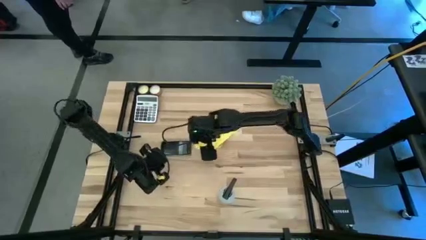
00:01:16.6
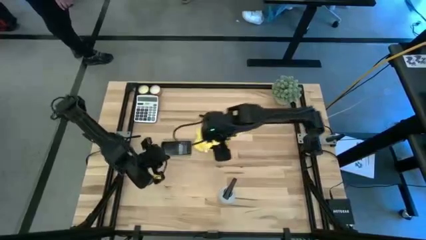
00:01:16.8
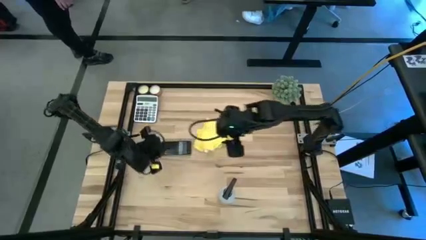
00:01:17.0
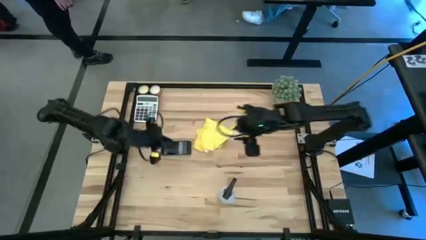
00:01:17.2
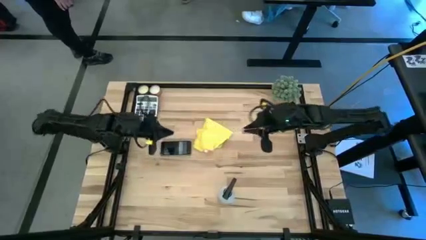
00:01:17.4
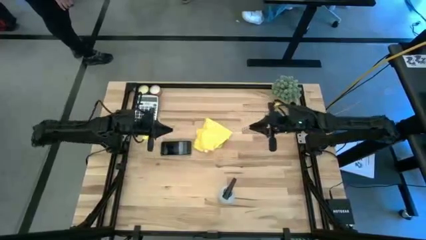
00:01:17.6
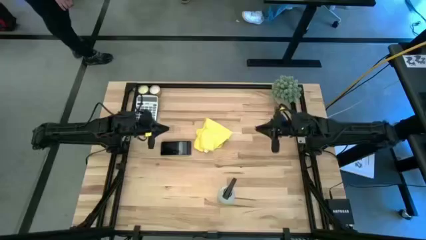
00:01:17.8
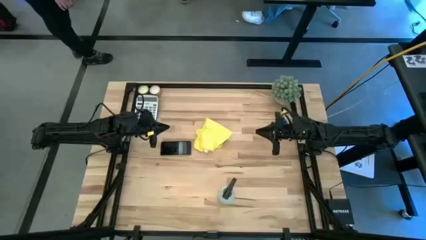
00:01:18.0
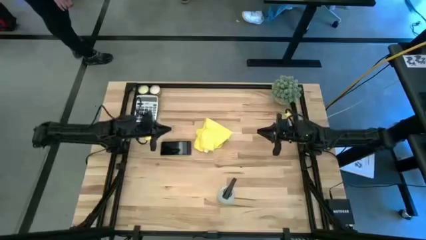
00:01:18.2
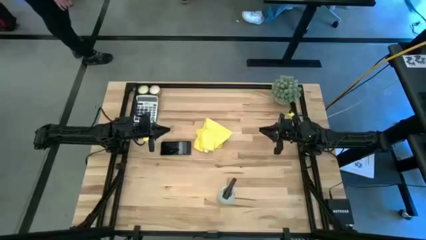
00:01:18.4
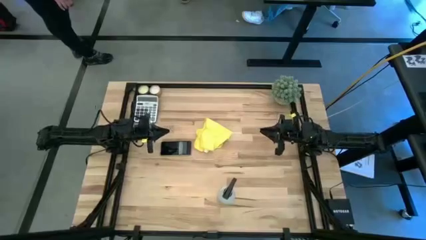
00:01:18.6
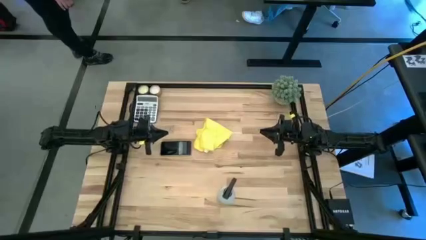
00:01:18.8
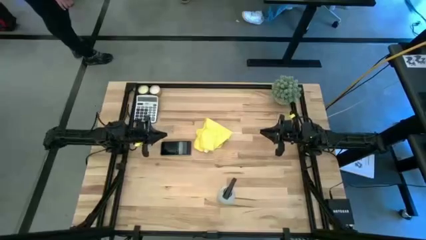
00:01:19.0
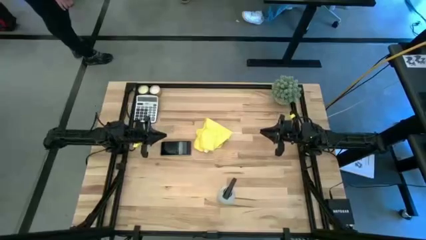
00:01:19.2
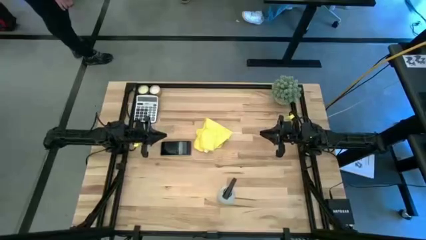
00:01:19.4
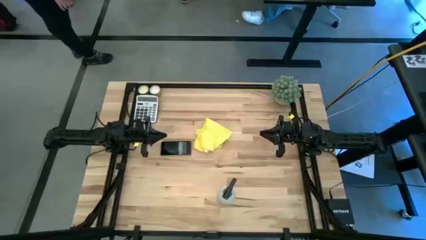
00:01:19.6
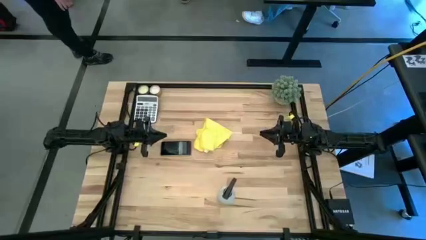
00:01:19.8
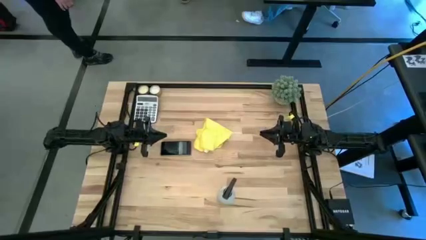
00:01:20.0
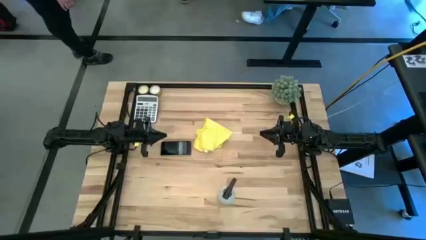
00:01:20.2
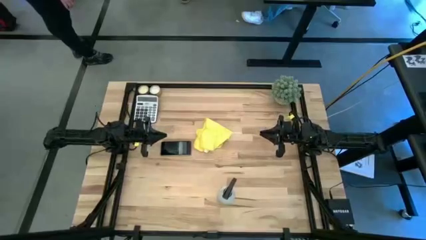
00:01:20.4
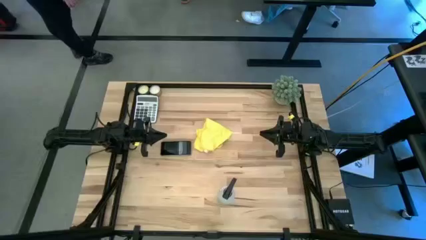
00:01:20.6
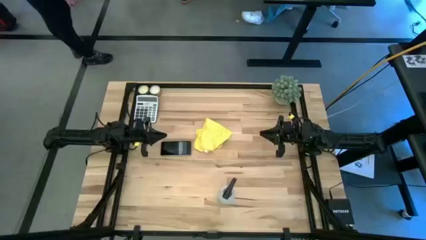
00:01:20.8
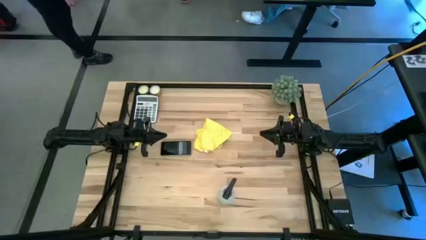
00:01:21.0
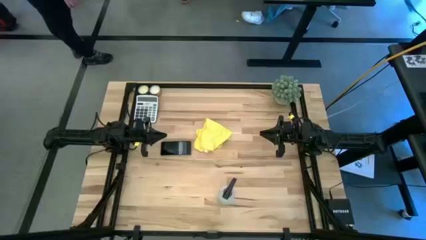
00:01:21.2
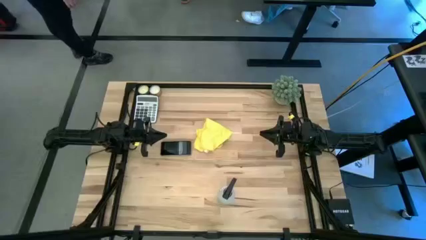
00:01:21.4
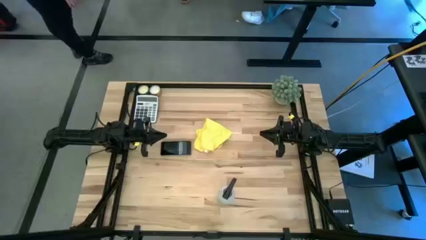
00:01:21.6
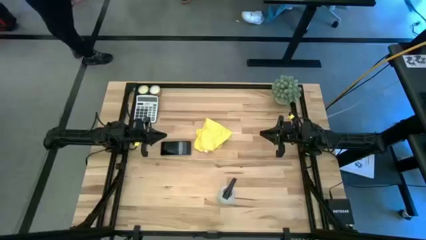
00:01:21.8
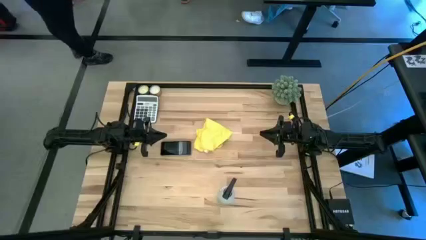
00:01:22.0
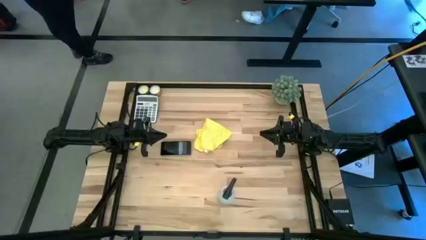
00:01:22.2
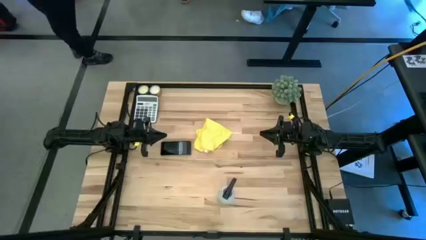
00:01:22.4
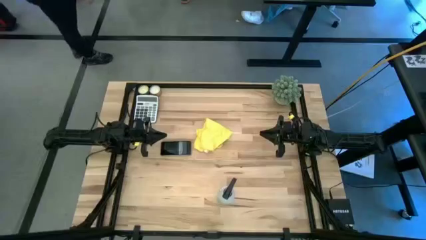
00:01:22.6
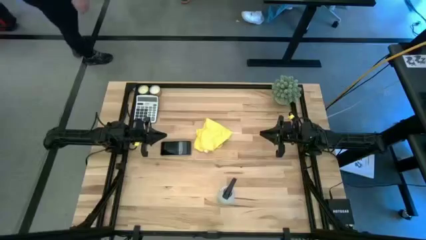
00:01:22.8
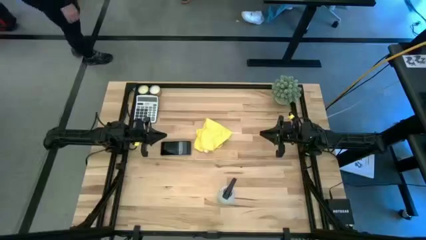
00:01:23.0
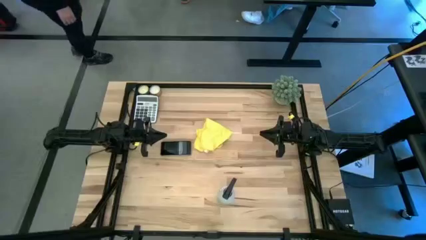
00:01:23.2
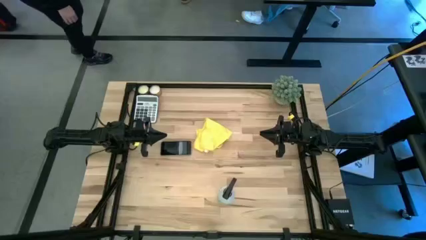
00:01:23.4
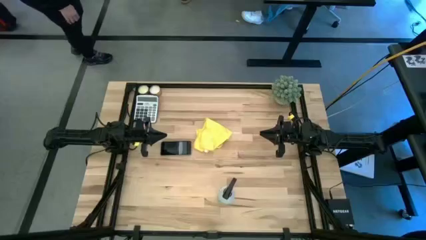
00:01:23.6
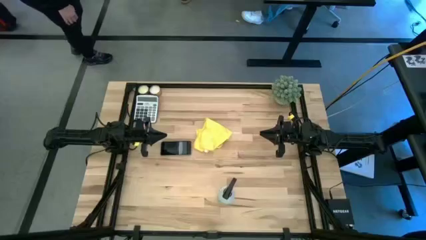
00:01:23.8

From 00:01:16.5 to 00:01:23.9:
Task: Apply microfiber cloth
Return to Home Position

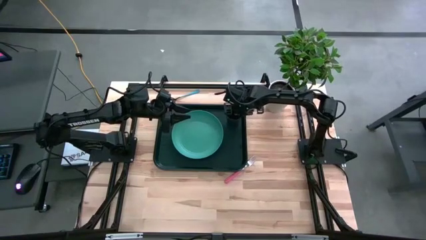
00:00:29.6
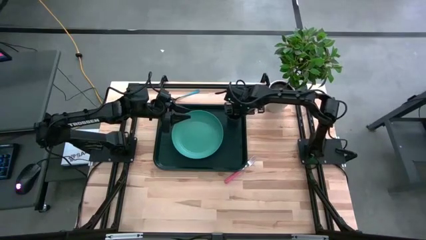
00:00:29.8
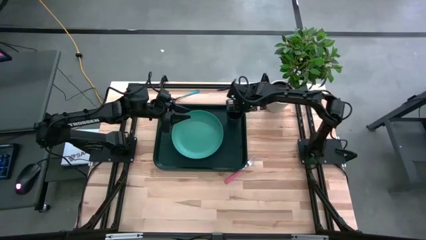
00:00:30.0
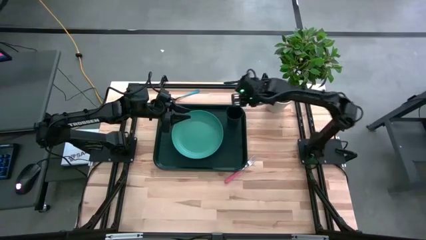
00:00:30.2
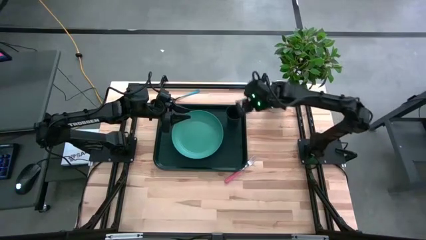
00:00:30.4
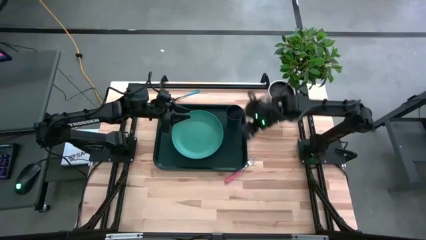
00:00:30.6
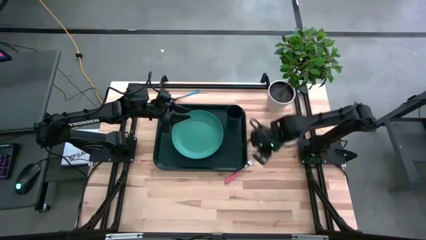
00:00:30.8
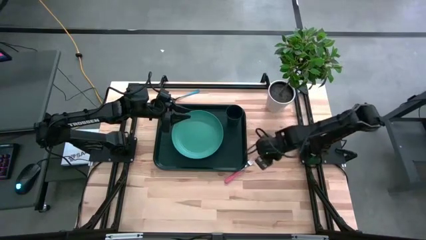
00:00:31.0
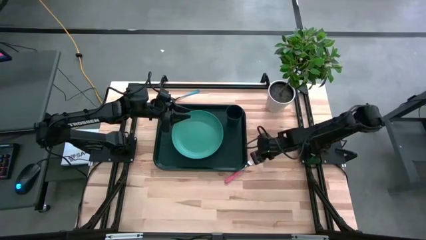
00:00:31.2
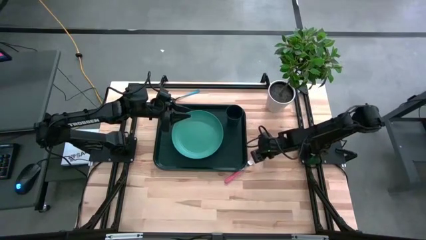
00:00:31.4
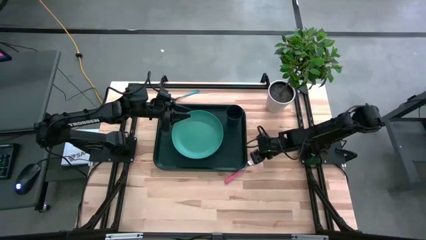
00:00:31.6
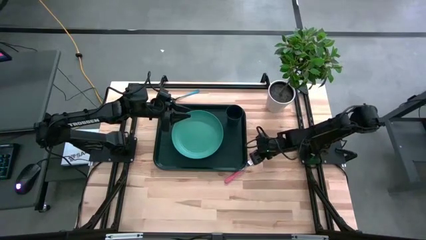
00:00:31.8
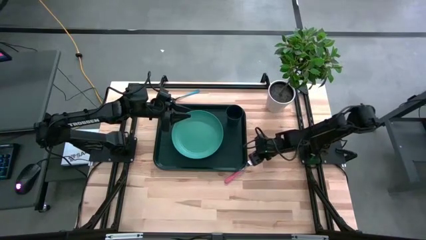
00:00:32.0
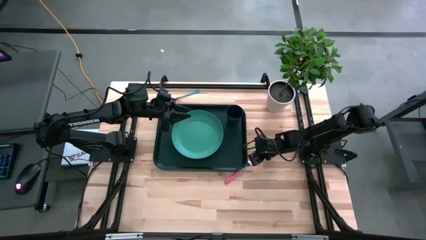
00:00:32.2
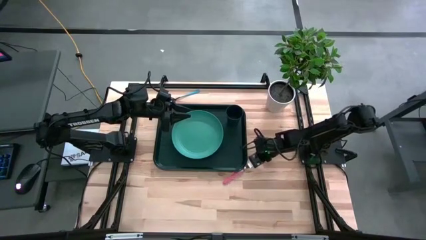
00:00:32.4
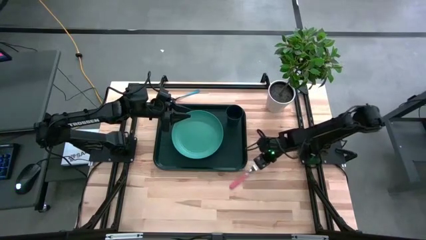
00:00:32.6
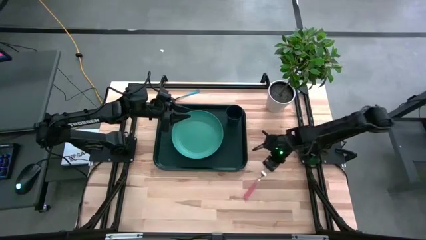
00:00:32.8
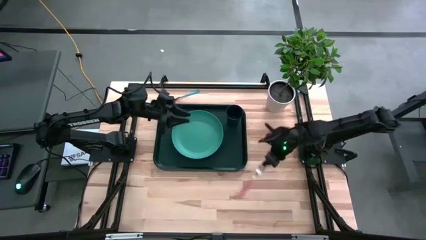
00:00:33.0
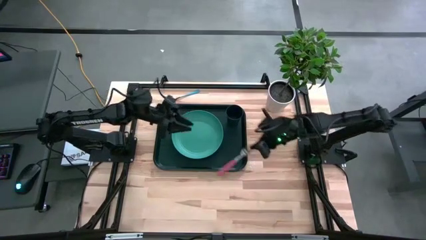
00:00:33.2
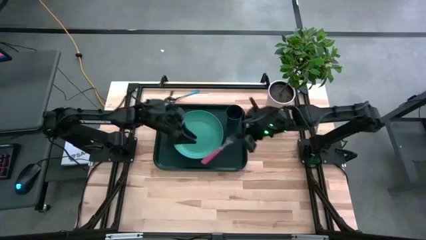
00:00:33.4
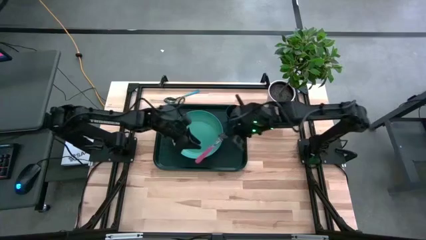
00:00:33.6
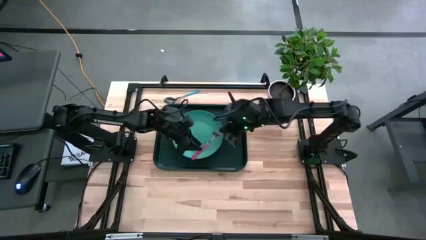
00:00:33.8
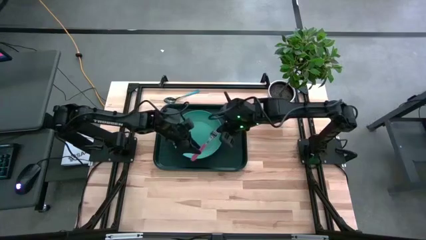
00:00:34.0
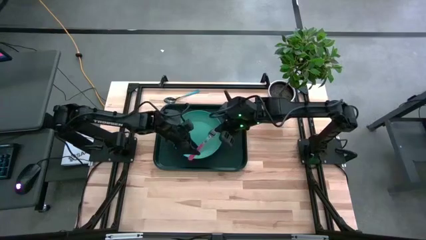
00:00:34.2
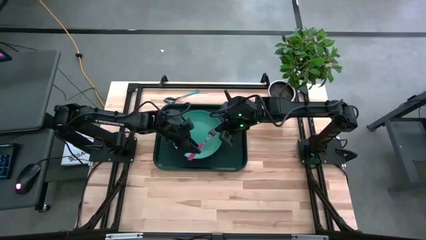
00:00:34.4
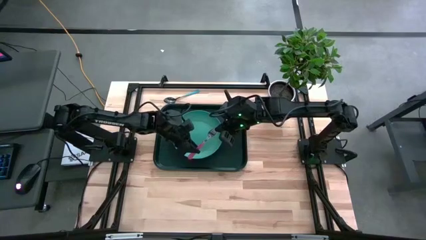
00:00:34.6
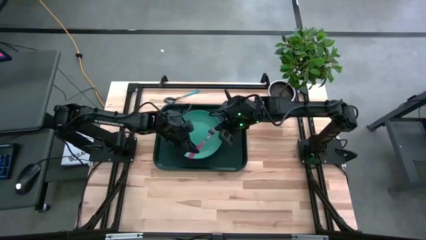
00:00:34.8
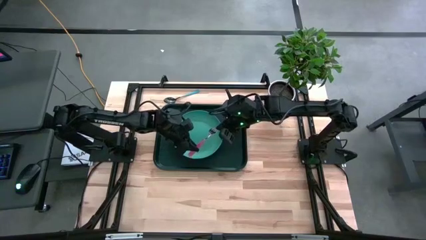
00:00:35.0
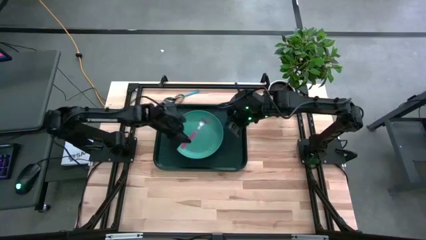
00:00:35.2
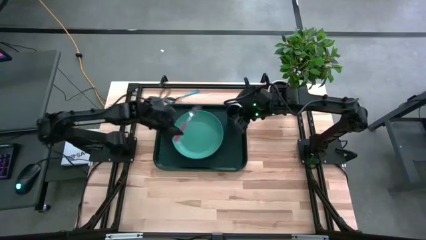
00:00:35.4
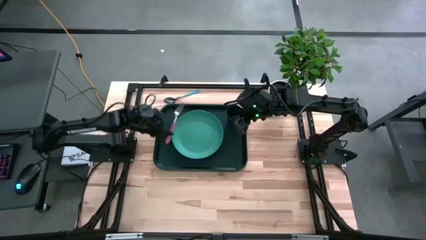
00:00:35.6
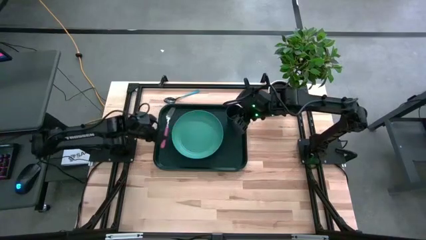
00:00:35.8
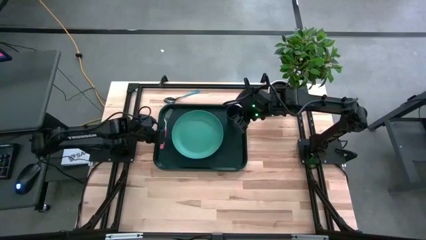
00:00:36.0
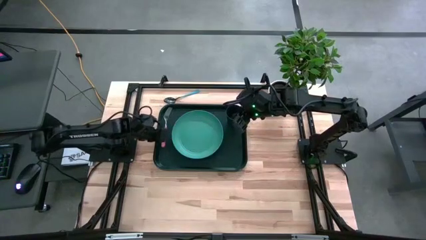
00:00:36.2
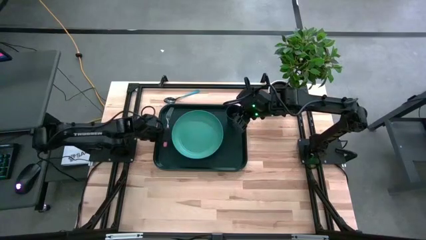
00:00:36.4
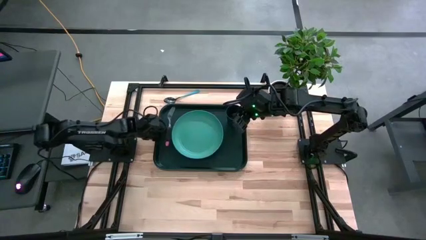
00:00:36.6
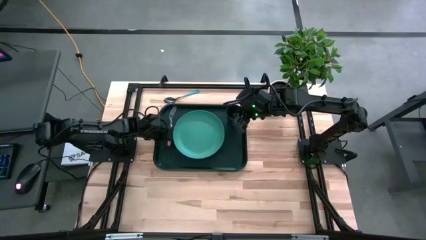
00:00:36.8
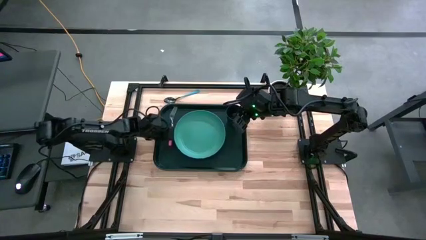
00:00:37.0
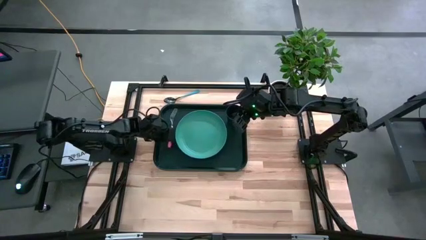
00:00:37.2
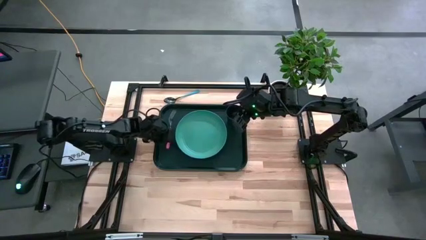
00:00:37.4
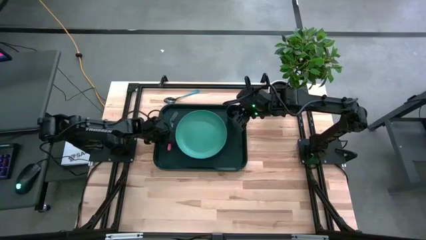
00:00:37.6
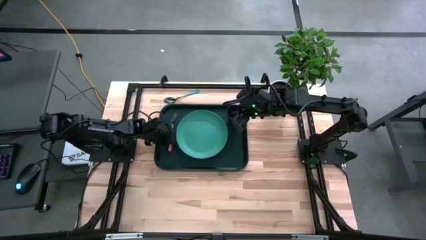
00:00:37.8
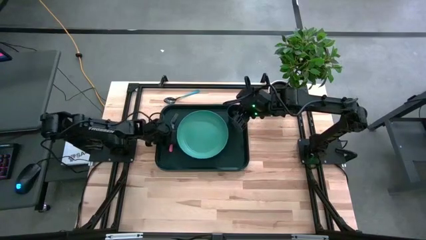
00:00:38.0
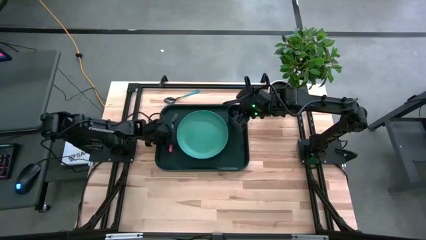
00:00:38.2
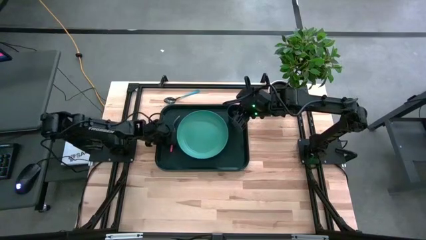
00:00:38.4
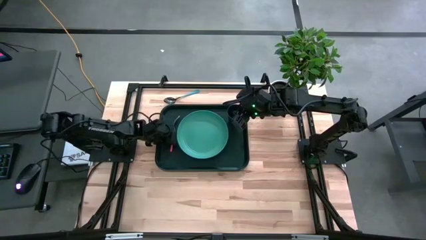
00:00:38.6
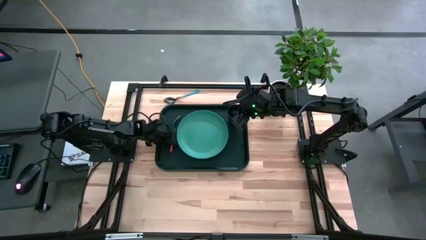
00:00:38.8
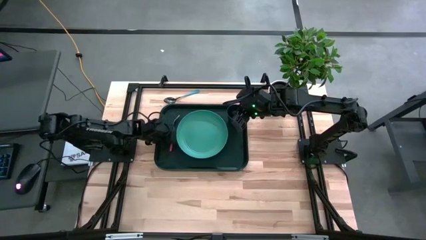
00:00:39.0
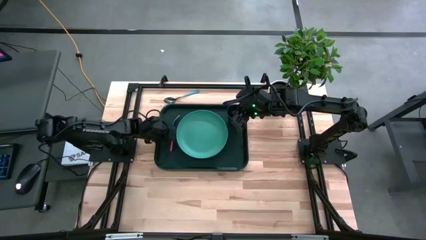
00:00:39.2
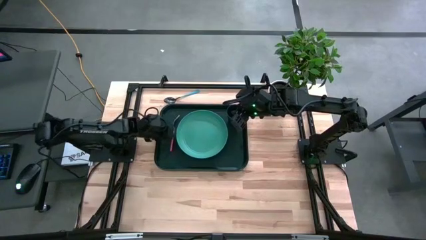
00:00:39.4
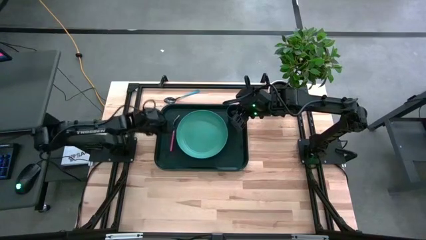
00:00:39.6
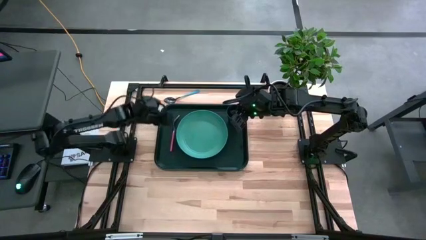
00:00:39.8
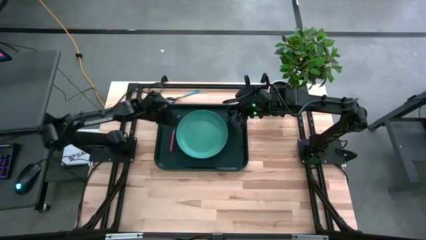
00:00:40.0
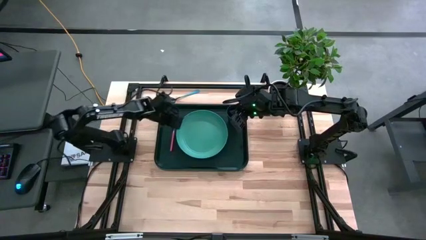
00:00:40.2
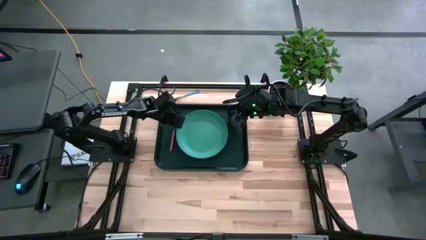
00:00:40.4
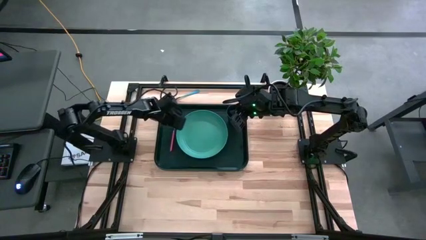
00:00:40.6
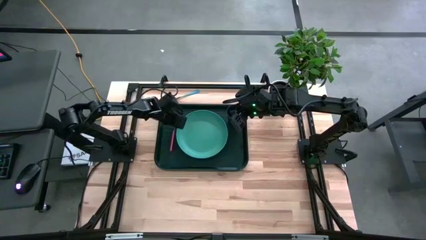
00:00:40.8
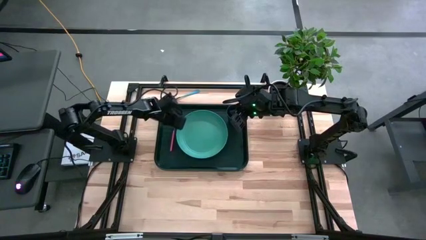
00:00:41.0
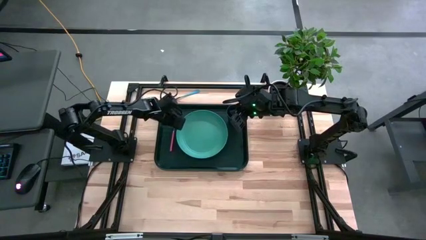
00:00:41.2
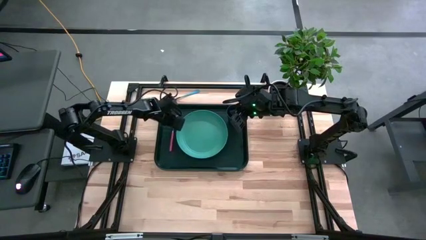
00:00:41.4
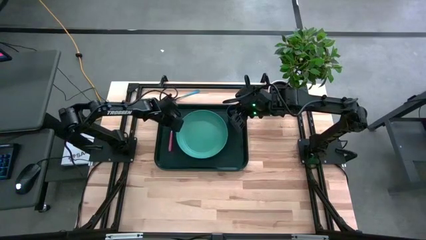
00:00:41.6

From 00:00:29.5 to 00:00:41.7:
Task: Pick and place plate/cup/fork/spoon on tray
Put the pink fork on the black serving tray to the left side of the green plate
